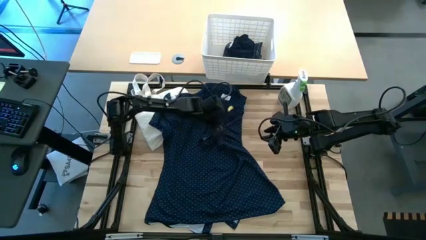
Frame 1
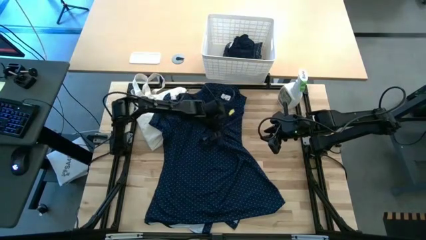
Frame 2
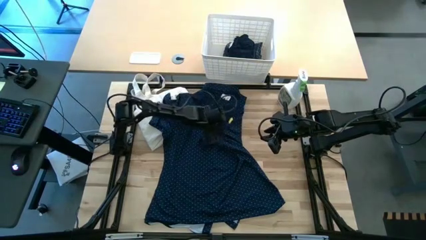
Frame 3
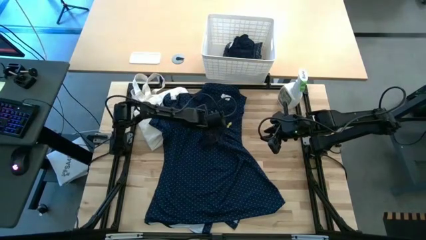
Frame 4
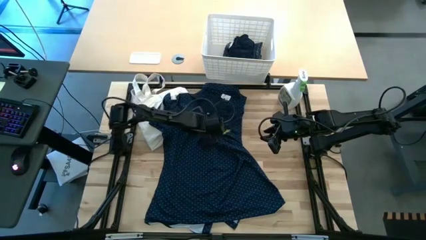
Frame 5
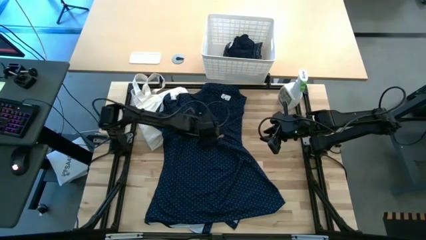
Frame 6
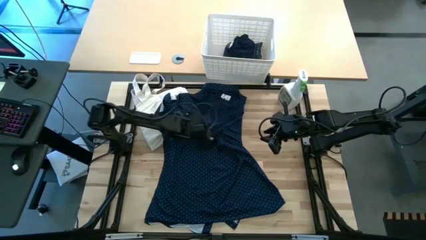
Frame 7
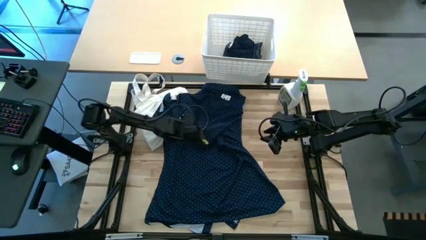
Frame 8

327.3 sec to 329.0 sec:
Fold the blue polo shirt

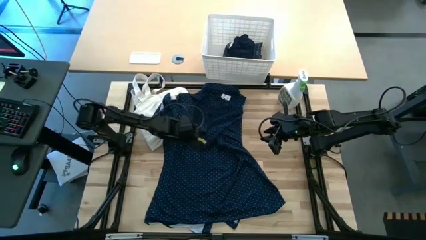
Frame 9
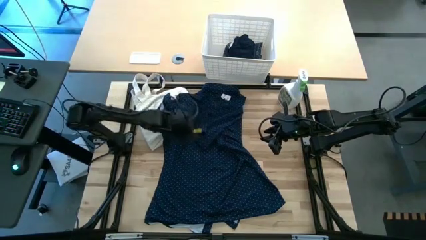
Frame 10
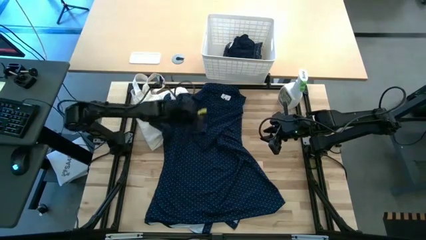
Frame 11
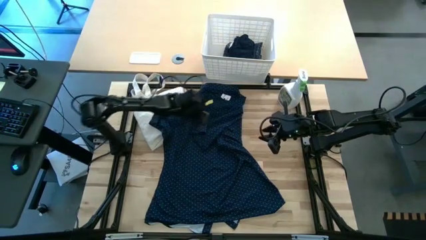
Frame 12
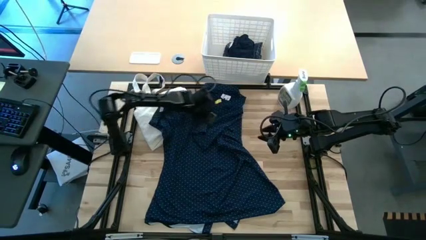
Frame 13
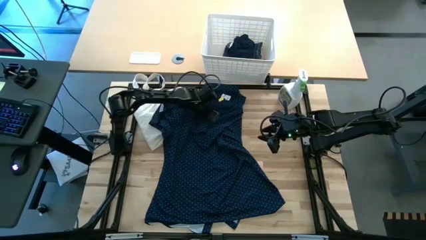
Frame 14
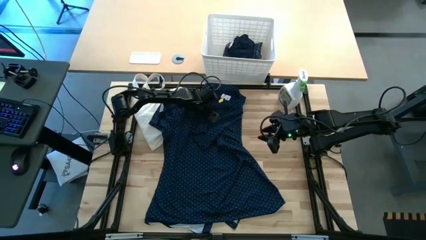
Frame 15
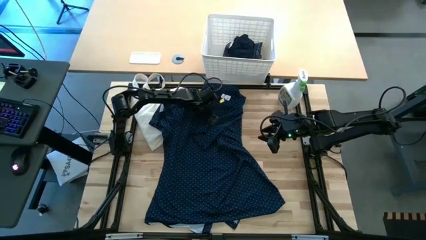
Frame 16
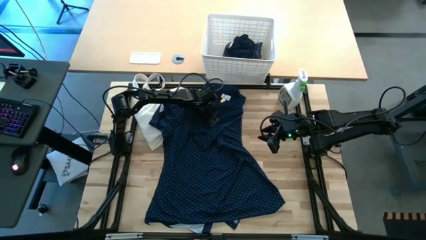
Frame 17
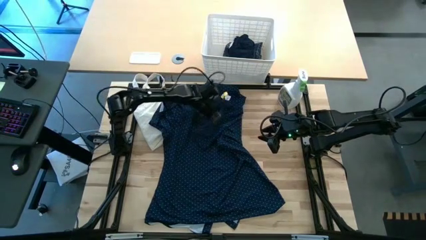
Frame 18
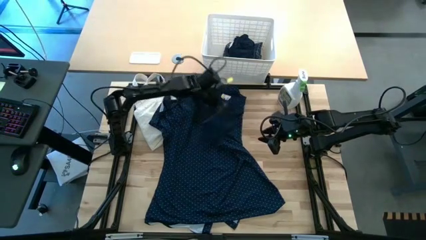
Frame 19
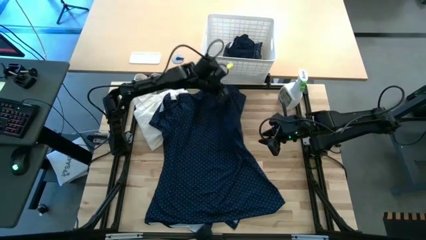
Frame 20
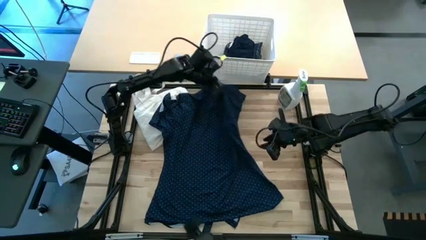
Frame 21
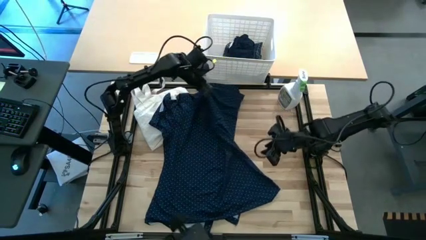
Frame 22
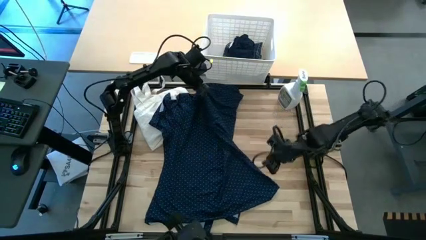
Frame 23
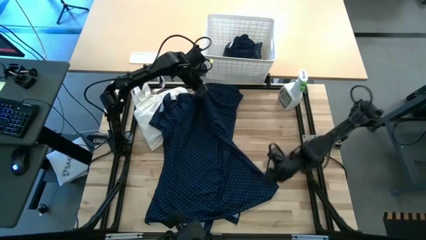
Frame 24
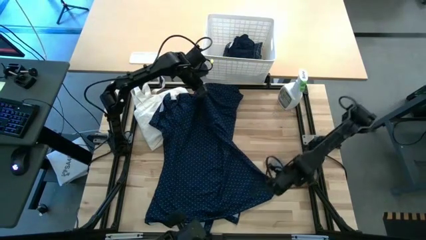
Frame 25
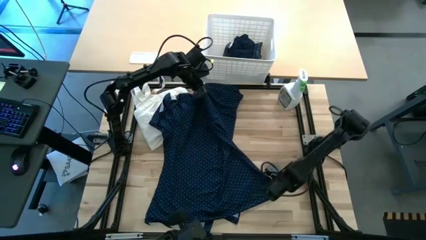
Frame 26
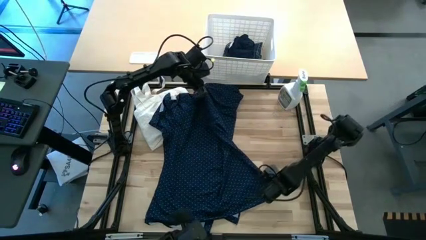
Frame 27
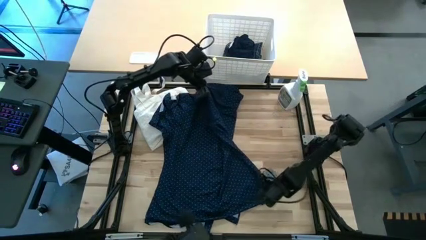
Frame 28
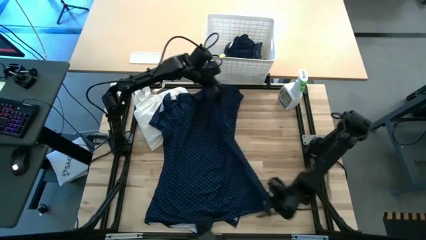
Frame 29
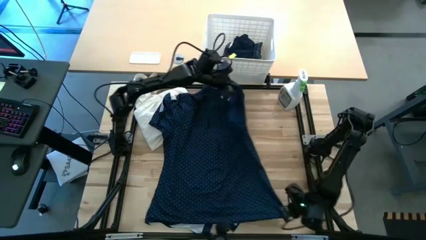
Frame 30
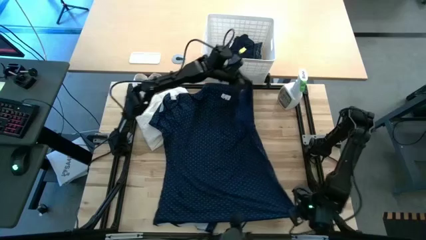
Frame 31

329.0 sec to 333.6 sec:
Fold the blue polo shirt
